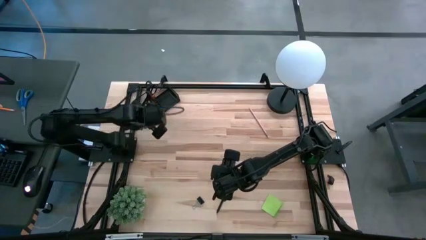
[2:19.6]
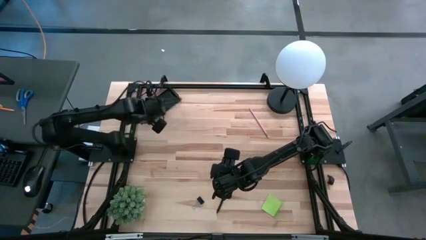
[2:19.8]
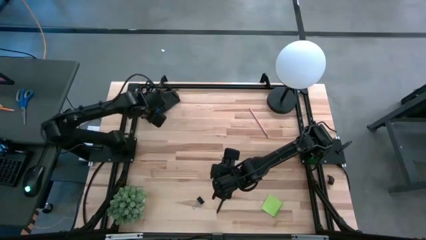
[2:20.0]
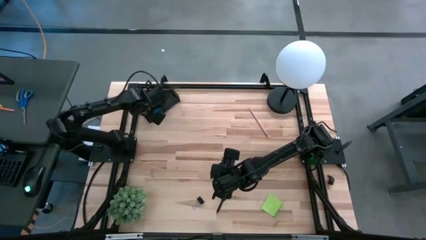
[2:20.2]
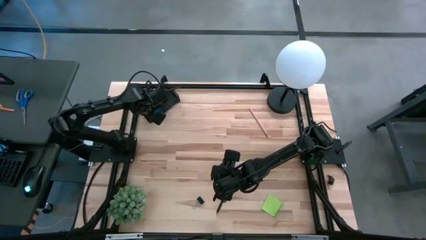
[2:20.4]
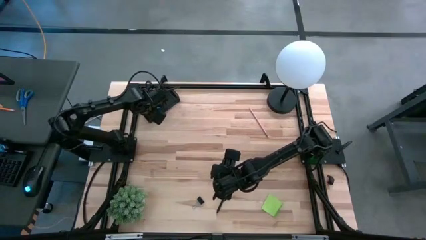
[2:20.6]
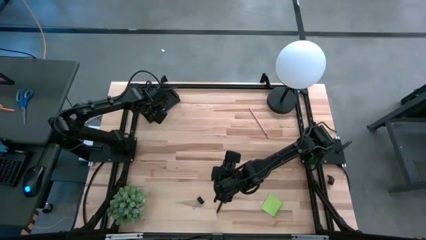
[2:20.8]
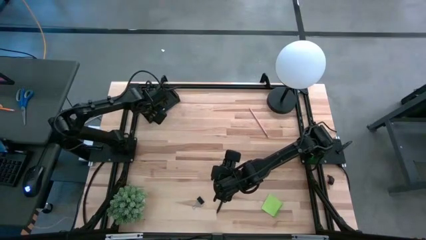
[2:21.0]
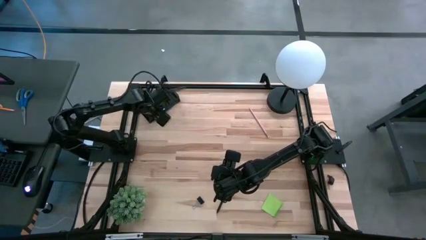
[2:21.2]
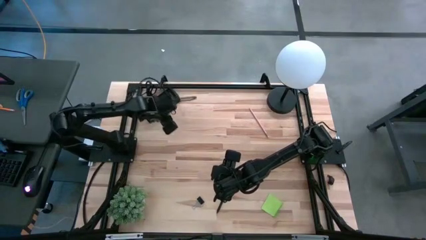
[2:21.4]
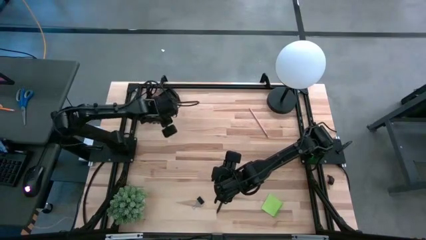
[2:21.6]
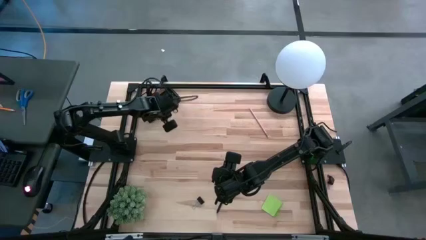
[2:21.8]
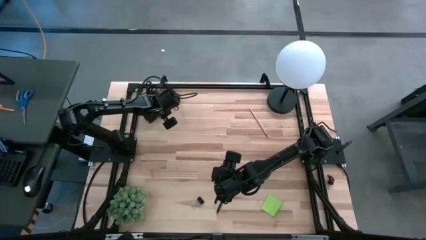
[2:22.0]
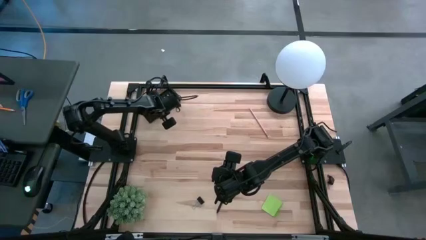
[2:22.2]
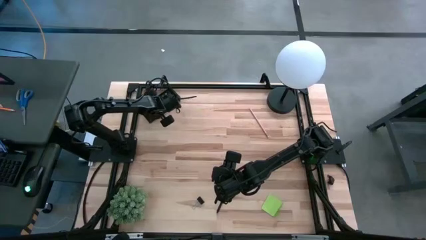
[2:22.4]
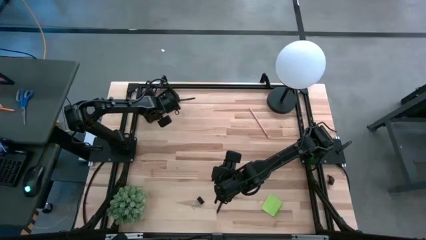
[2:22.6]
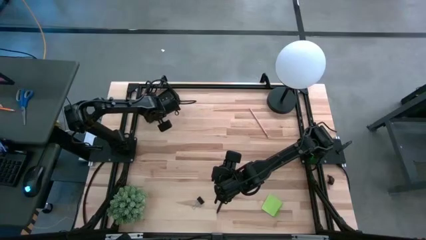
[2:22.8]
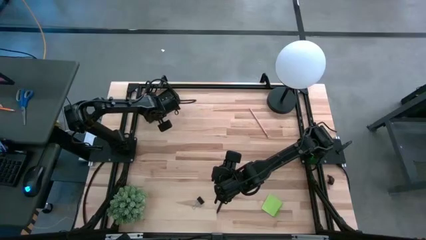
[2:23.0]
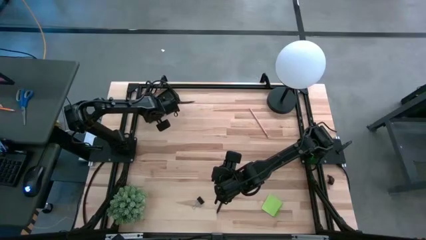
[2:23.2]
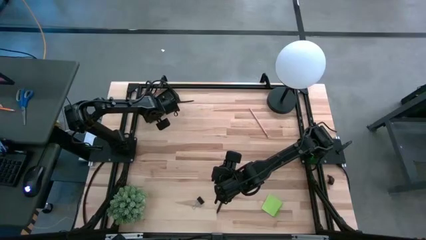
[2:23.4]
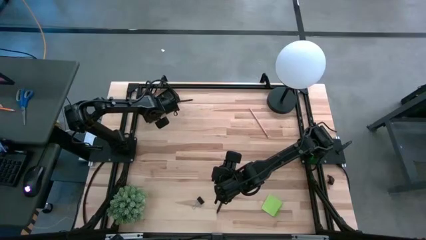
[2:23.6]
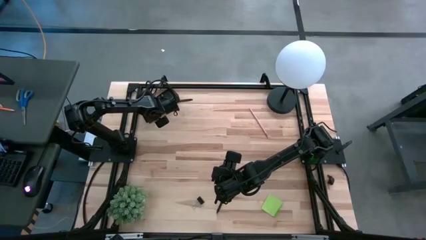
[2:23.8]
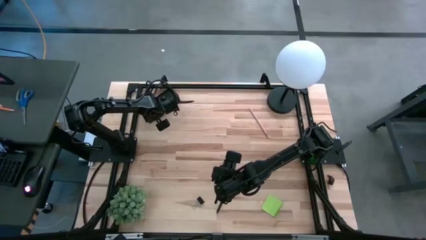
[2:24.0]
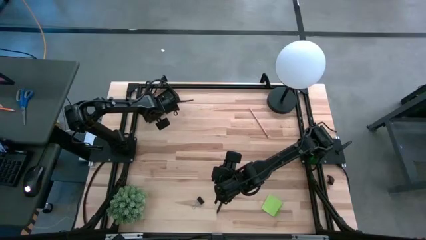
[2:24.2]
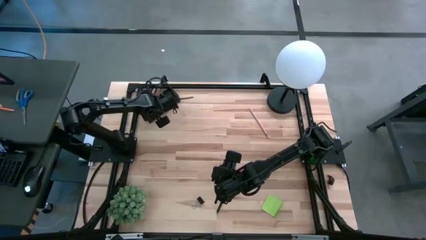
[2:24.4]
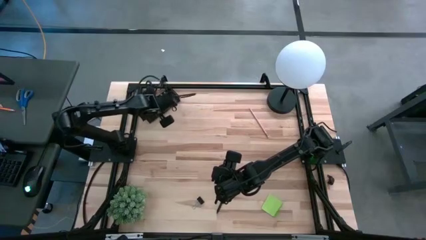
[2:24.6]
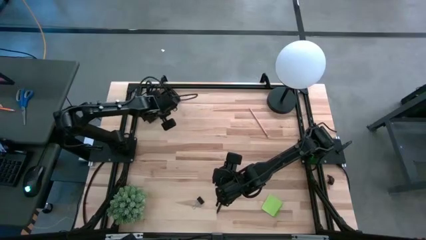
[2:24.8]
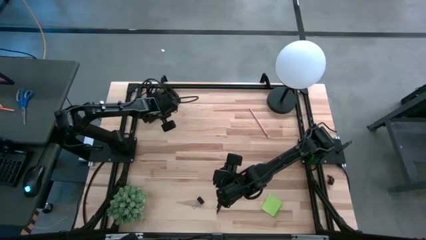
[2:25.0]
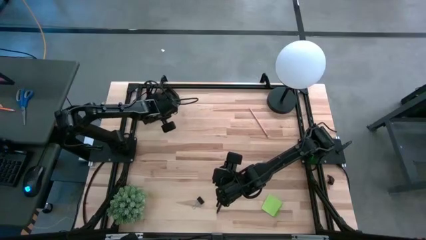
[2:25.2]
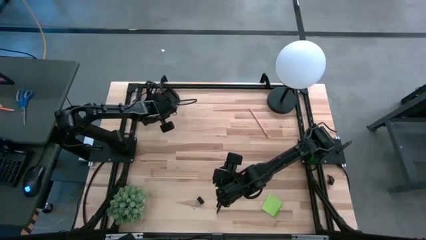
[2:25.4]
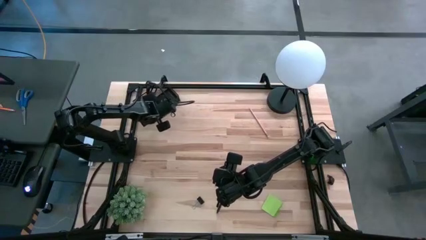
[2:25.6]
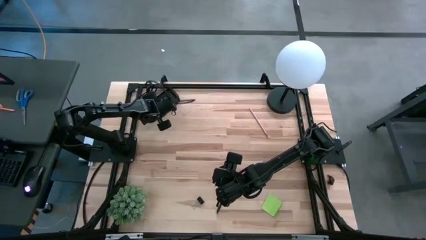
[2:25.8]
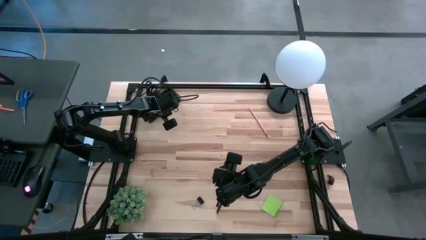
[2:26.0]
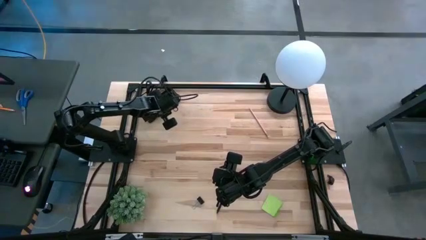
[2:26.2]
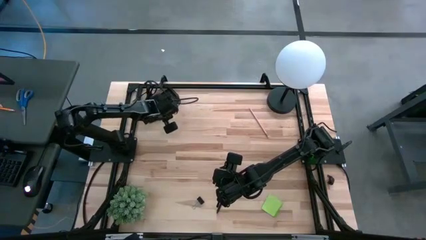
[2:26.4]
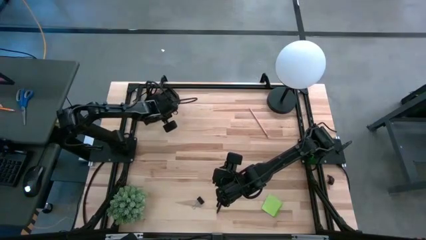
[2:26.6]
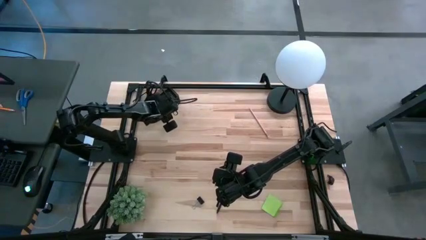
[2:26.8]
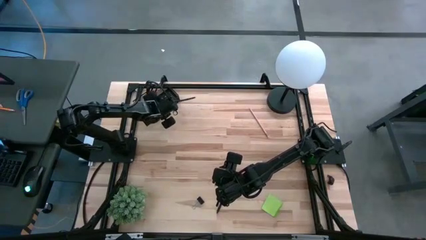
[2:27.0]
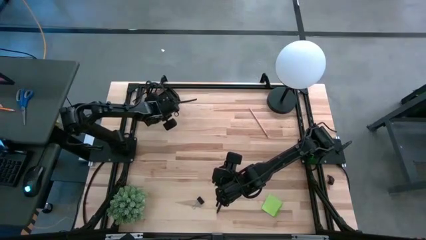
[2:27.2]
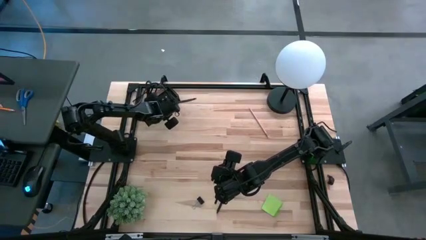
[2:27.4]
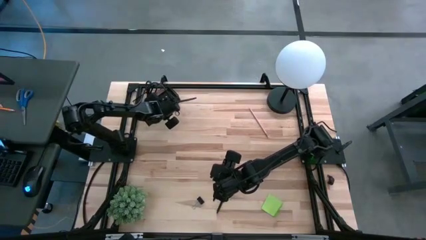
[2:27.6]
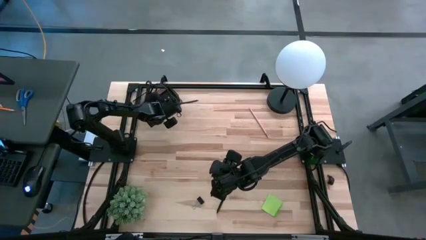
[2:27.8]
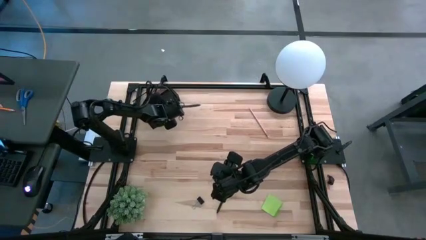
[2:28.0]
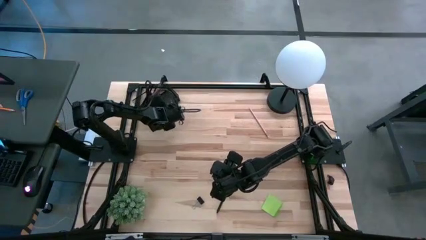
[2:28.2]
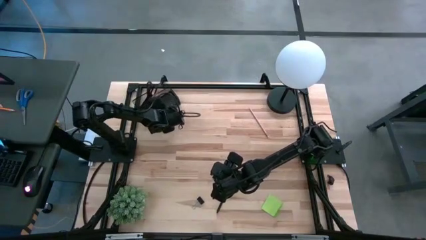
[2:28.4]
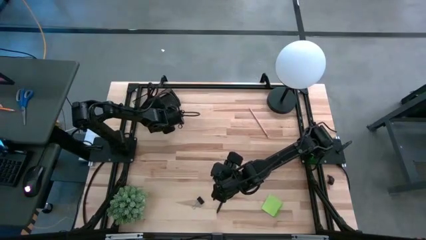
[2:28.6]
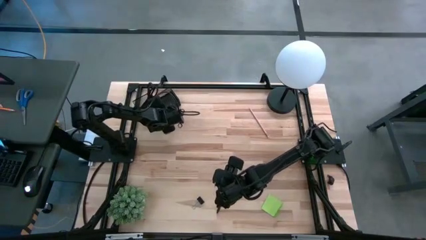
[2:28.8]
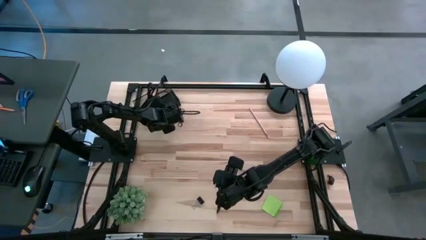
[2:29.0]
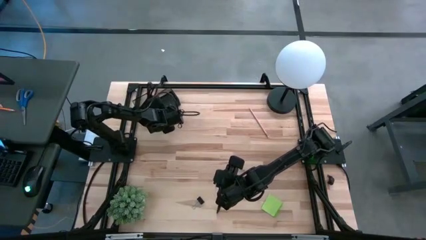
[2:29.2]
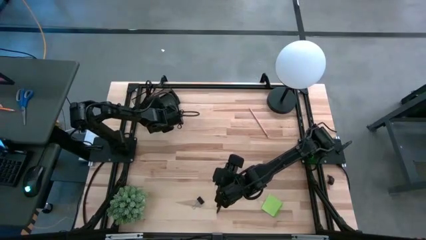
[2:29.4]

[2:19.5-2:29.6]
Task: Pick and place office supplies into organizer
Put the black binder clip into the black desk organizer

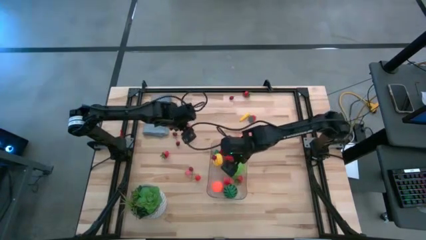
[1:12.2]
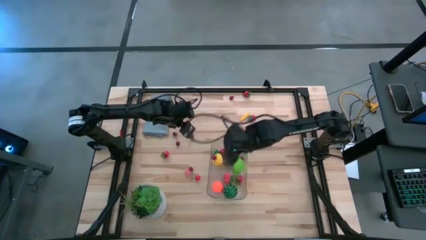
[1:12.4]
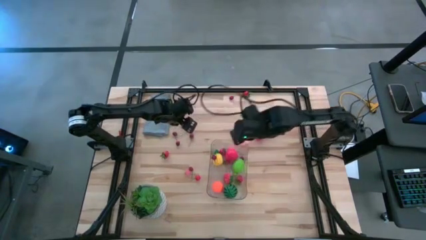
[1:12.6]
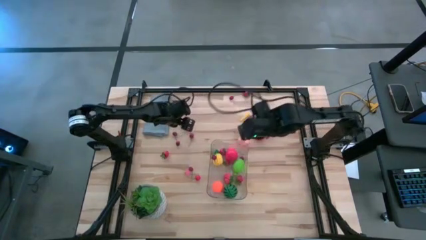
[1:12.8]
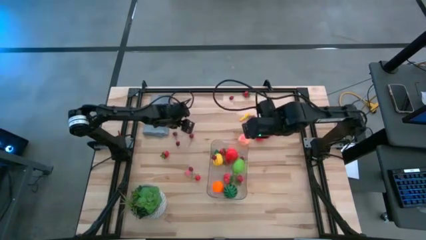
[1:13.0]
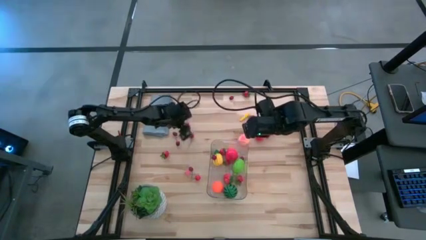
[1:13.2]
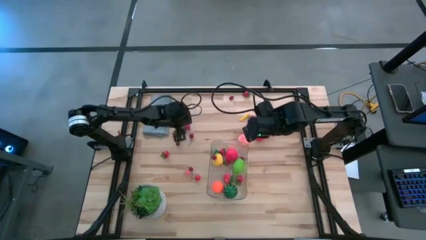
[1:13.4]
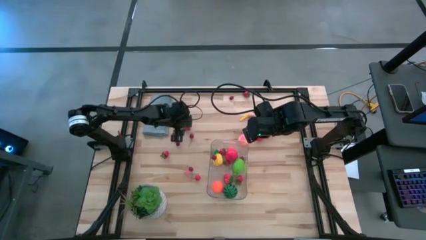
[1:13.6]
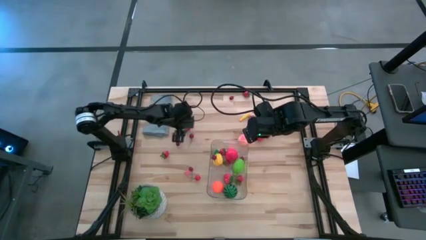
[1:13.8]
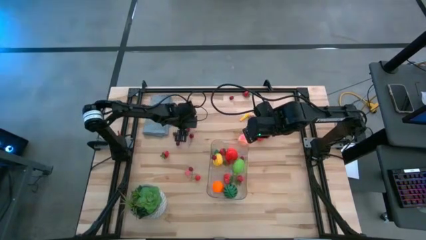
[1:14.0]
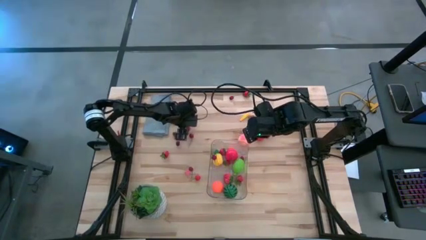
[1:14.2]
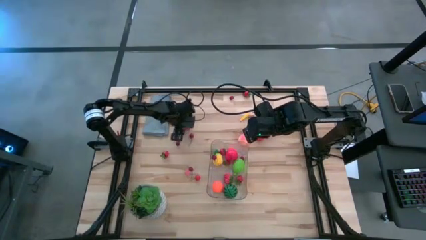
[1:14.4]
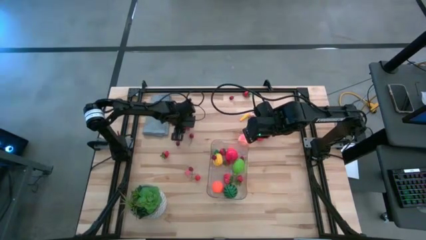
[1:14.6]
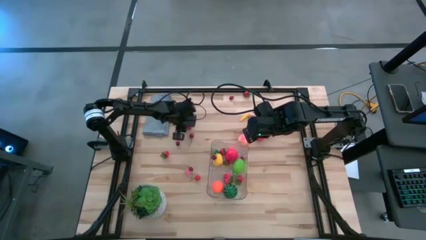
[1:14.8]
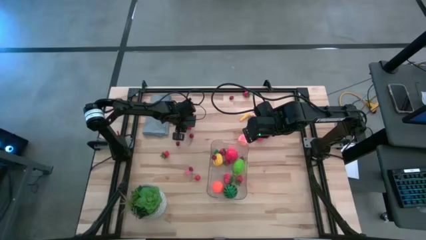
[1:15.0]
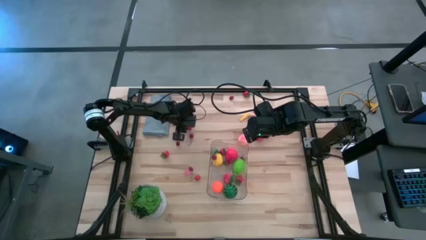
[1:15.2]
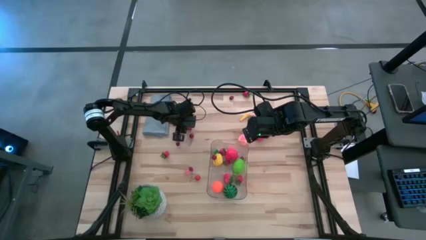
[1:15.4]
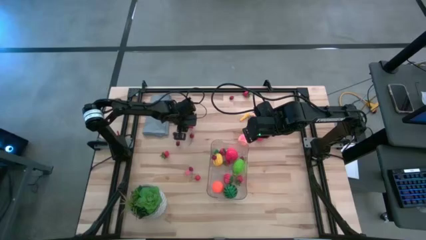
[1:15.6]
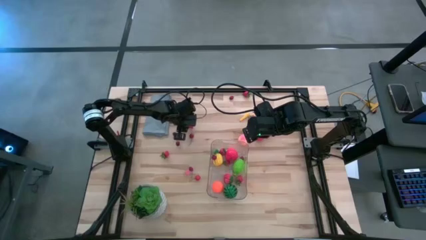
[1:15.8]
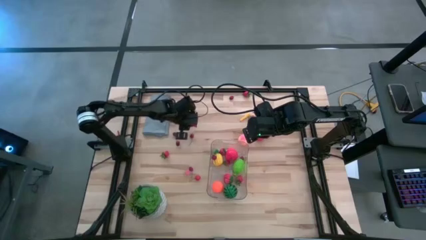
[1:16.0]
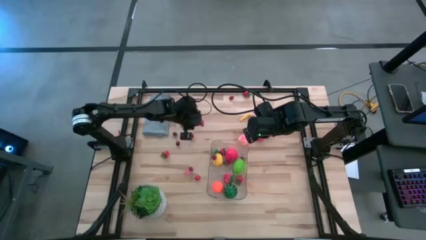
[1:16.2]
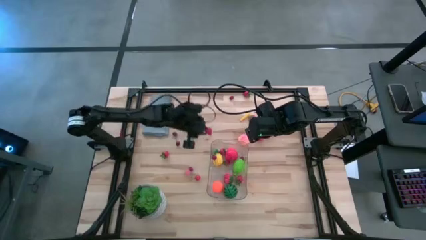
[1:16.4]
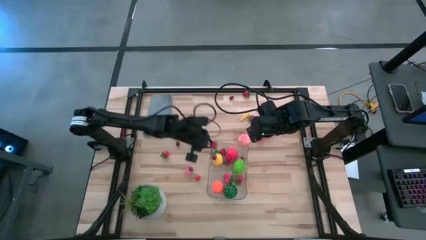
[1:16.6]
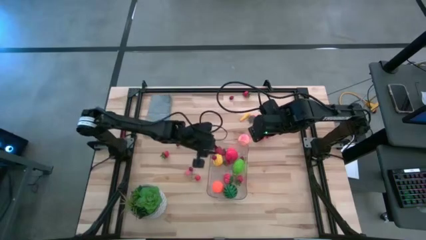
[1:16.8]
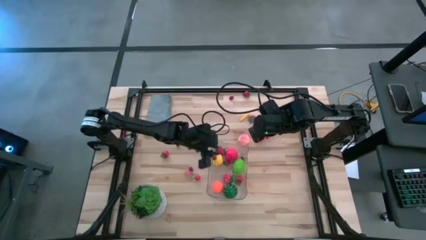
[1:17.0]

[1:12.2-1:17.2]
Task: Pick and placing Produce into tupperware
Put the strawberry into the transparent bin

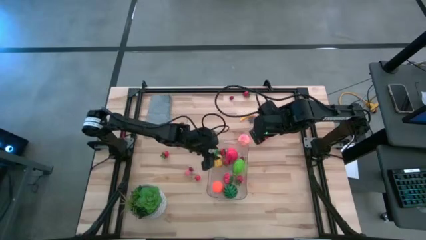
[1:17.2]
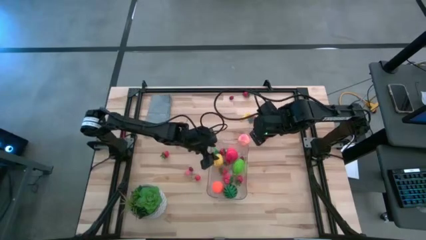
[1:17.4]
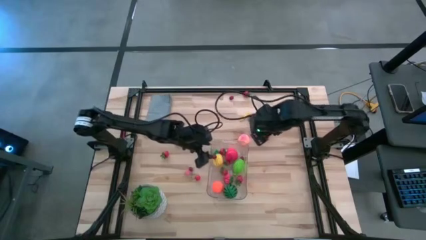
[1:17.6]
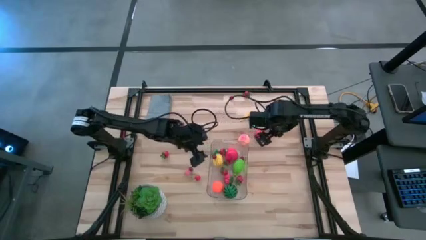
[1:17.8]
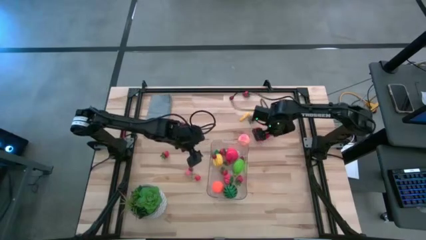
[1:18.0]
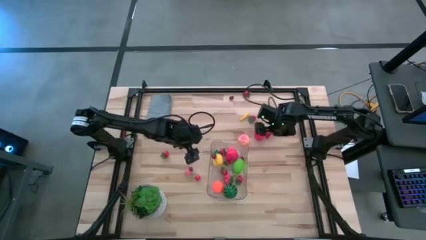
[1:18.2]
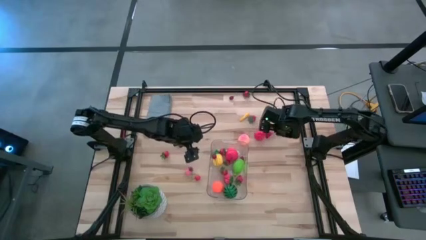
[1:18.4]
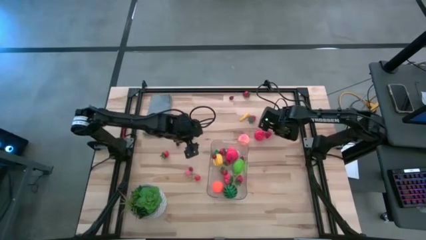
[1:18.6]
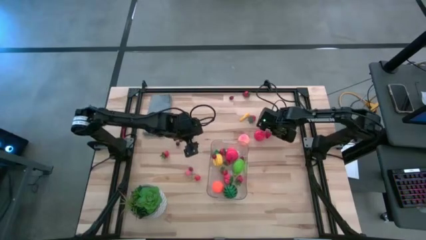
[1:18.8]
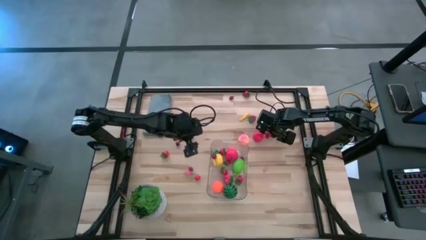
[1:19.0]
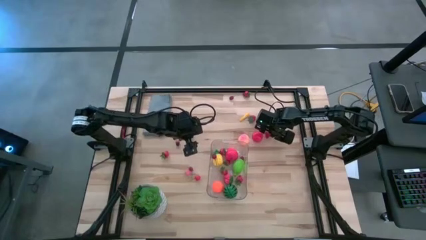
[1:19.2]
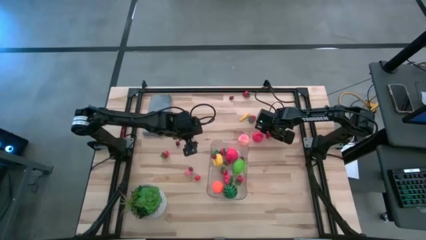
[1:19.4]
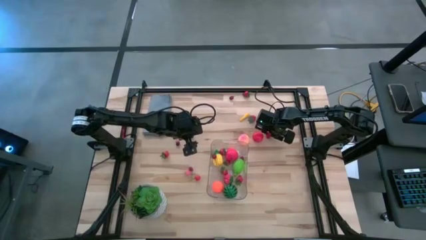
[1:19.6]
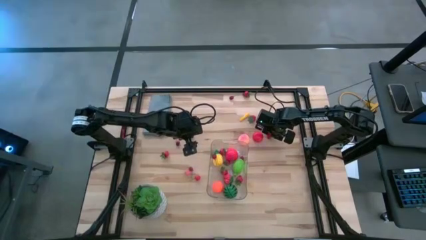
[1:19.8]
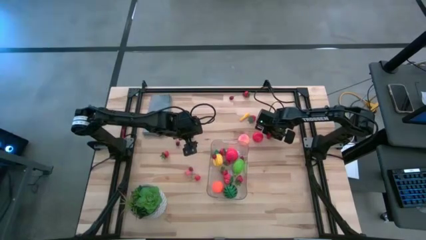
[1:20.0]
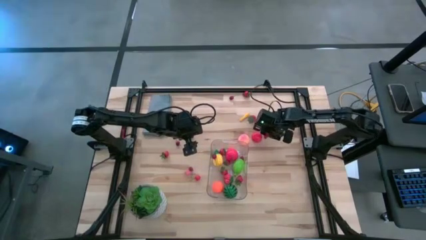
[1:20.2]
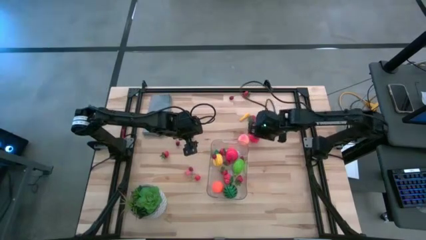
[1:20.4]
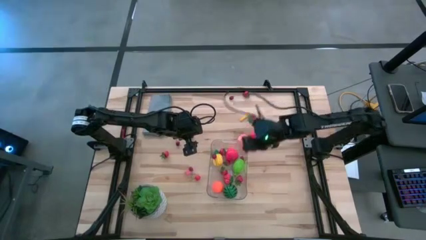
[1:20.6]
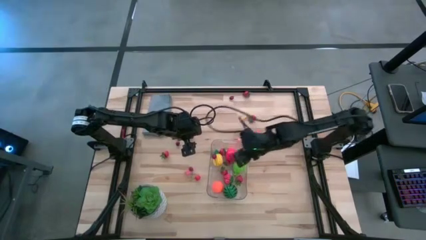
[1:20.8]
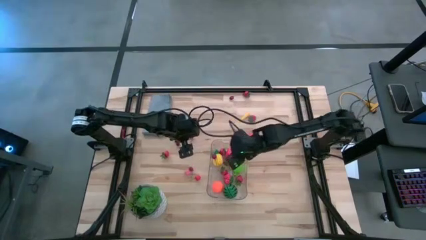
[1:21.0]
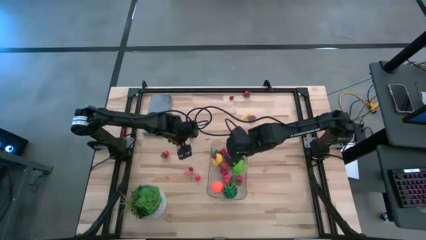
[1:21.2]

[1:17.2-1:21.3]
Put the strawberry into the transparent bin
